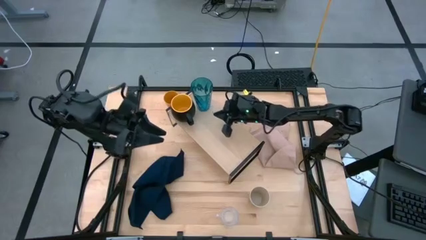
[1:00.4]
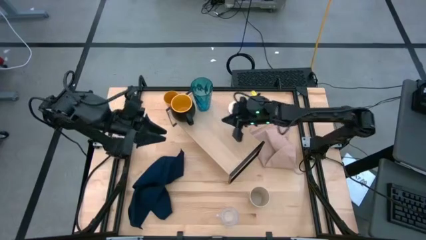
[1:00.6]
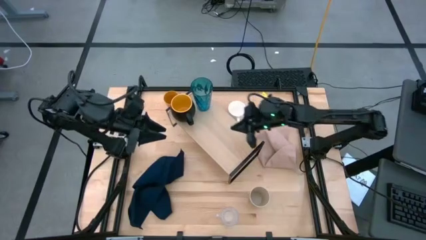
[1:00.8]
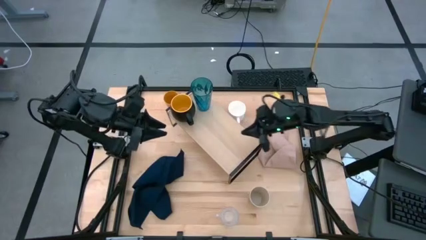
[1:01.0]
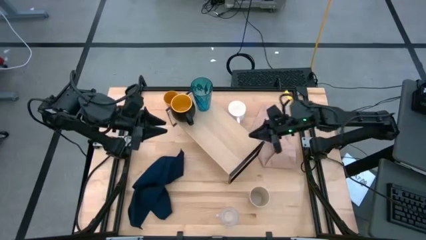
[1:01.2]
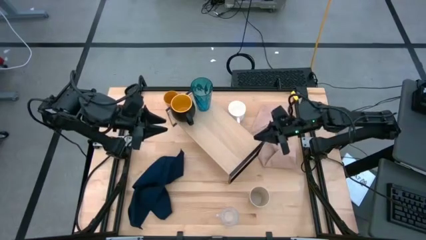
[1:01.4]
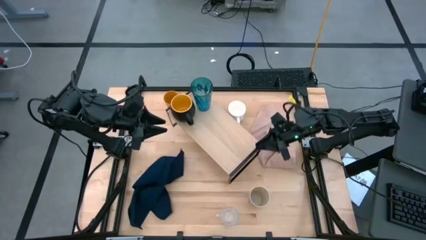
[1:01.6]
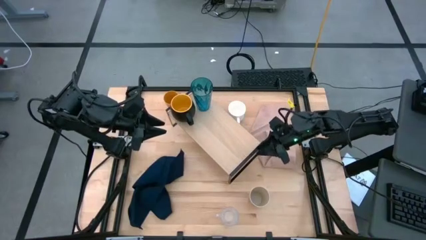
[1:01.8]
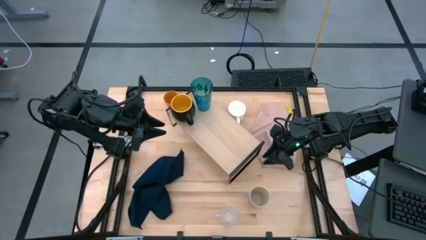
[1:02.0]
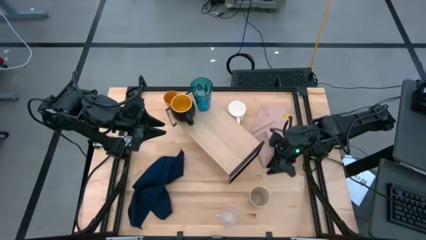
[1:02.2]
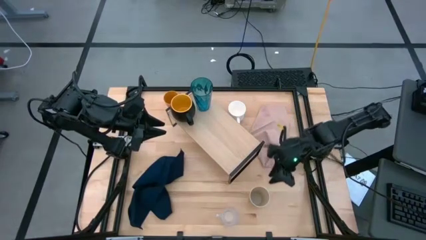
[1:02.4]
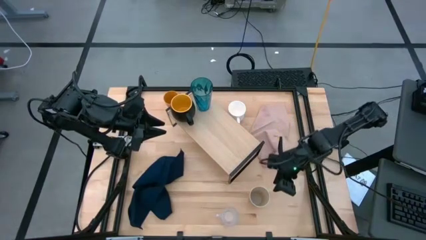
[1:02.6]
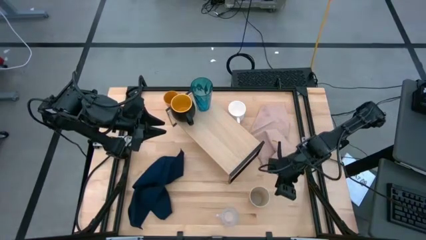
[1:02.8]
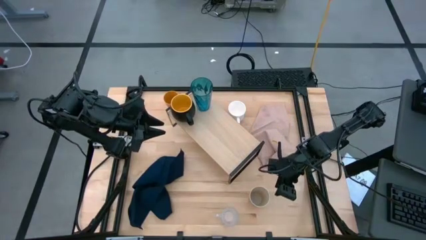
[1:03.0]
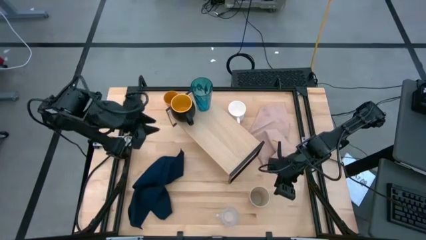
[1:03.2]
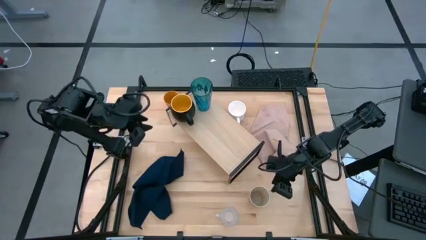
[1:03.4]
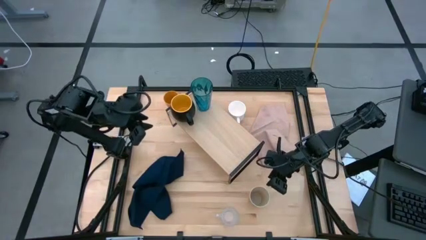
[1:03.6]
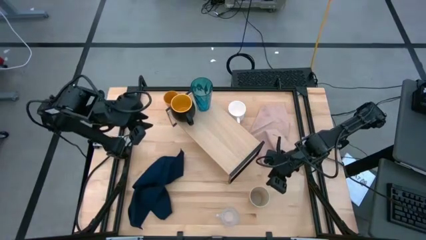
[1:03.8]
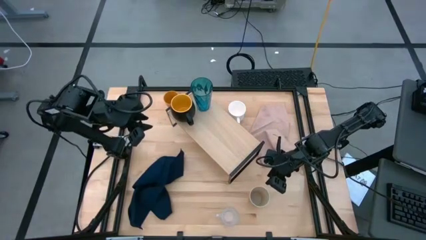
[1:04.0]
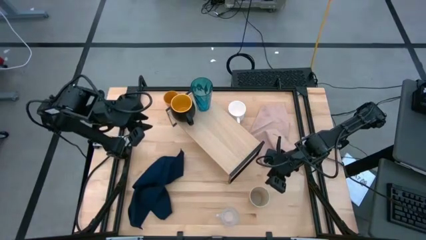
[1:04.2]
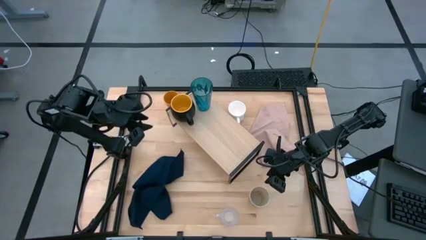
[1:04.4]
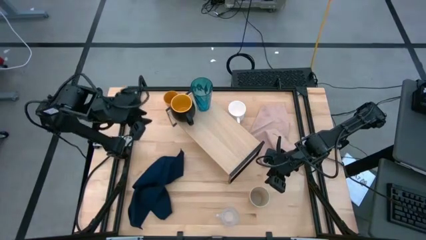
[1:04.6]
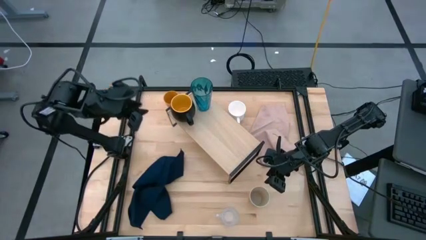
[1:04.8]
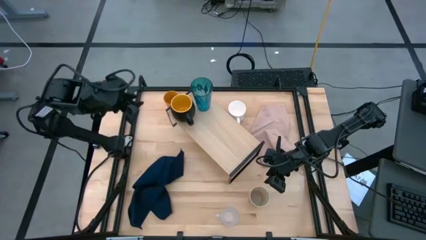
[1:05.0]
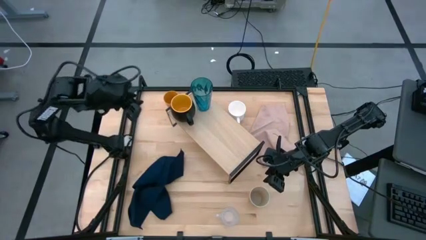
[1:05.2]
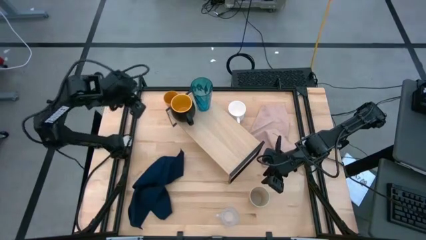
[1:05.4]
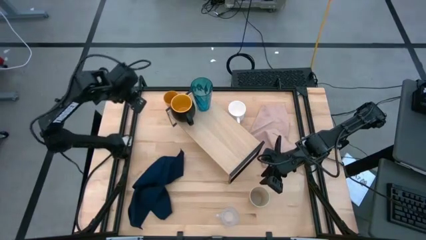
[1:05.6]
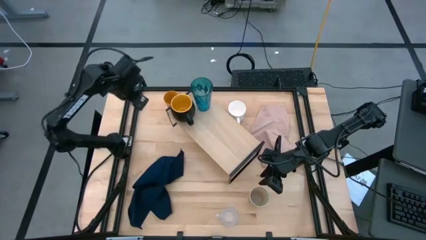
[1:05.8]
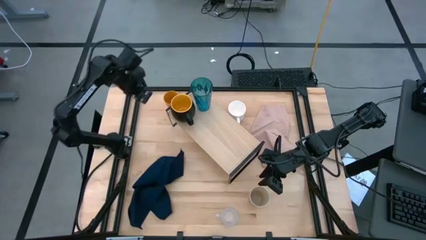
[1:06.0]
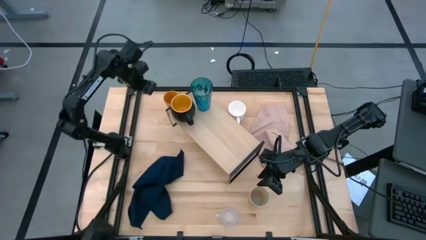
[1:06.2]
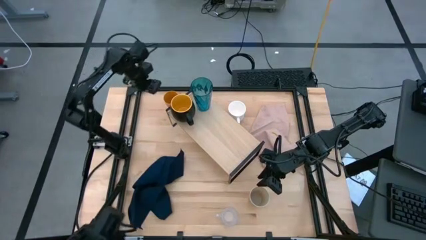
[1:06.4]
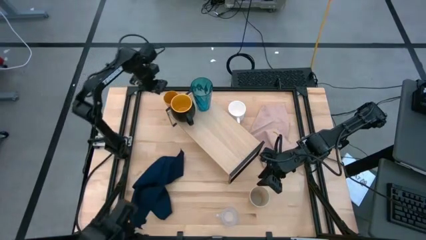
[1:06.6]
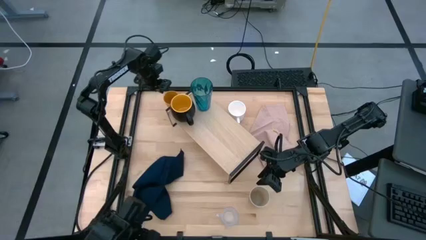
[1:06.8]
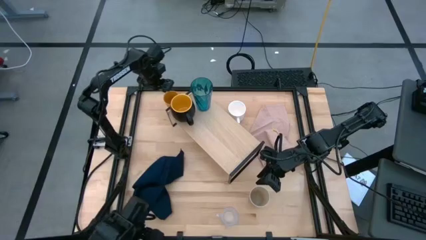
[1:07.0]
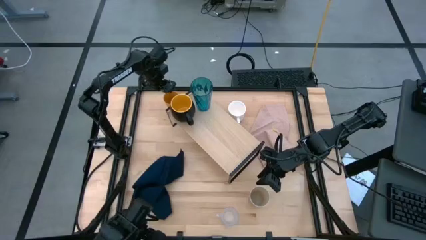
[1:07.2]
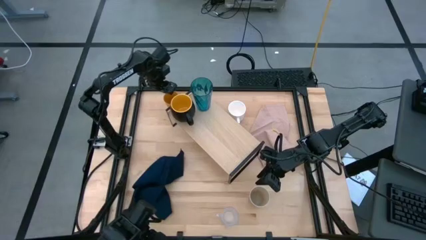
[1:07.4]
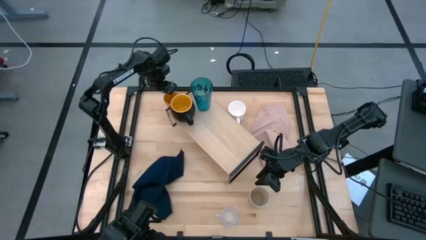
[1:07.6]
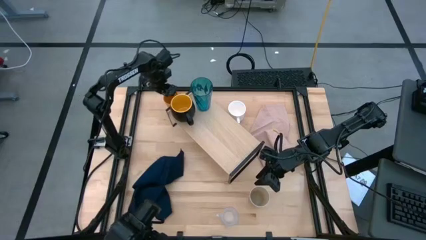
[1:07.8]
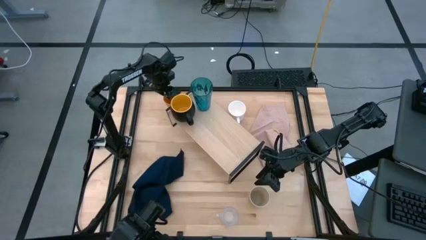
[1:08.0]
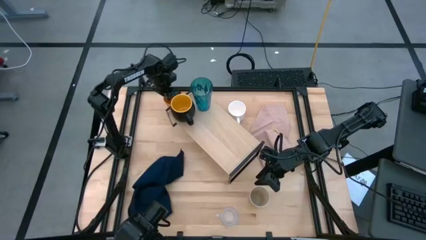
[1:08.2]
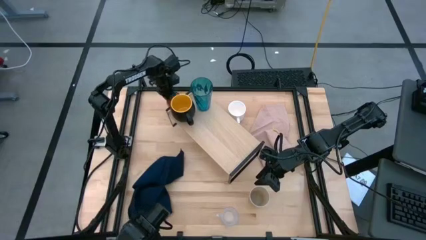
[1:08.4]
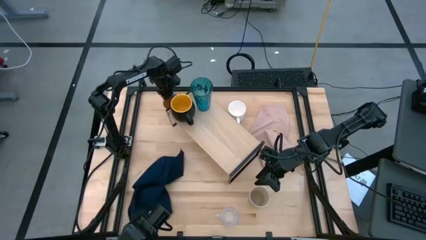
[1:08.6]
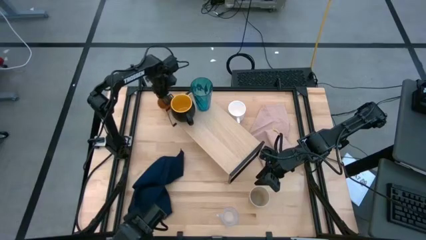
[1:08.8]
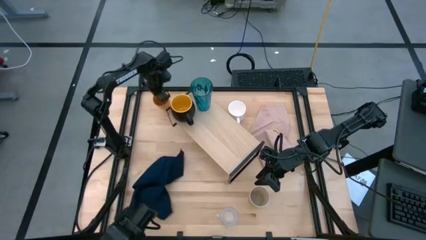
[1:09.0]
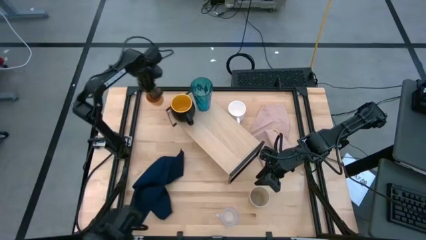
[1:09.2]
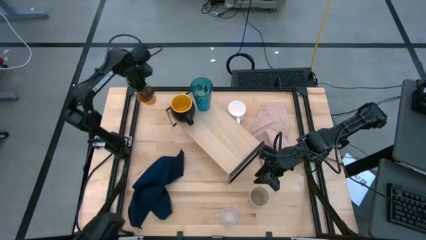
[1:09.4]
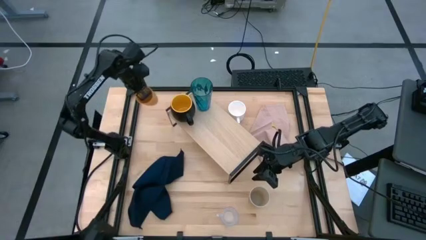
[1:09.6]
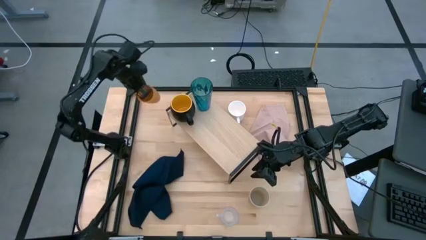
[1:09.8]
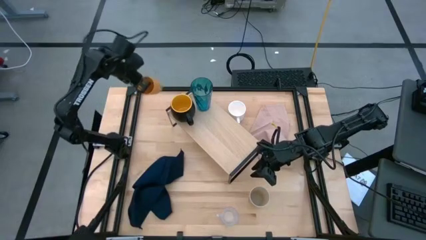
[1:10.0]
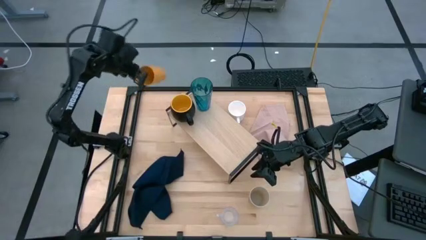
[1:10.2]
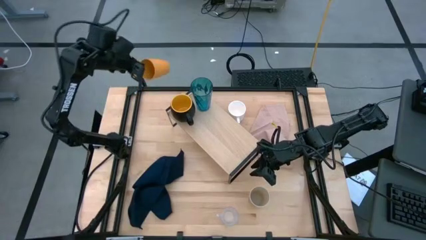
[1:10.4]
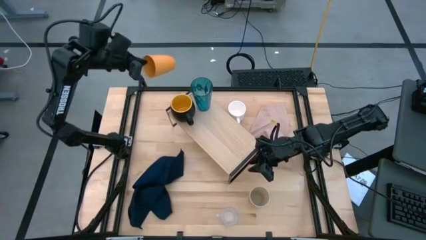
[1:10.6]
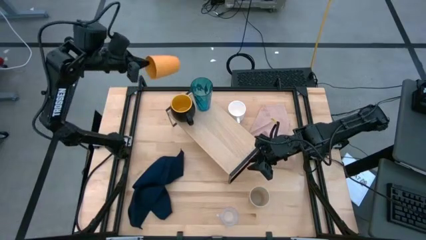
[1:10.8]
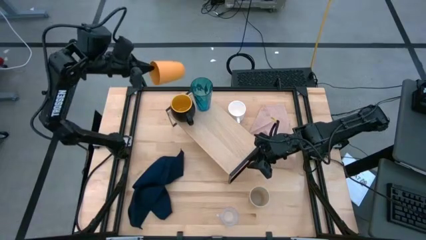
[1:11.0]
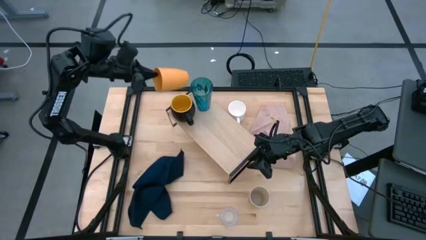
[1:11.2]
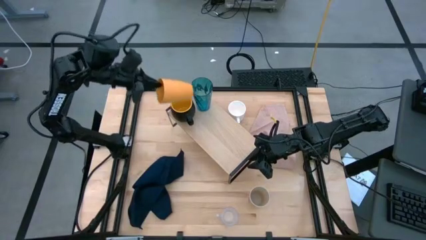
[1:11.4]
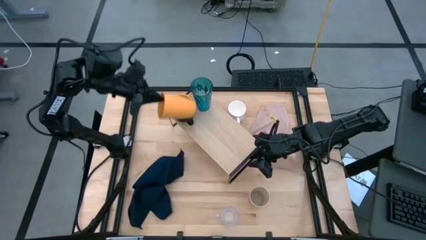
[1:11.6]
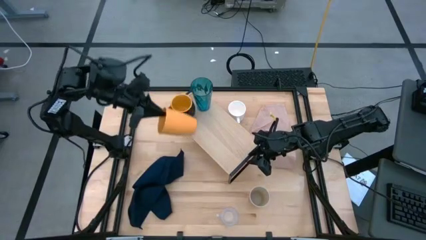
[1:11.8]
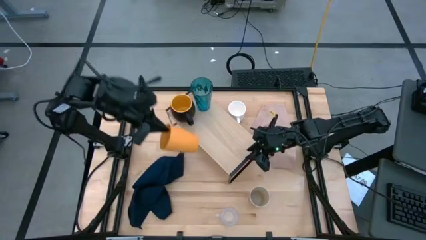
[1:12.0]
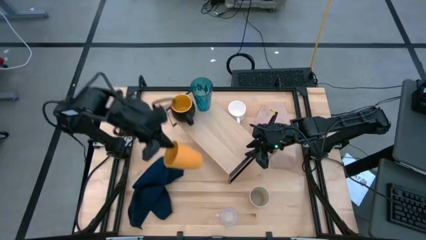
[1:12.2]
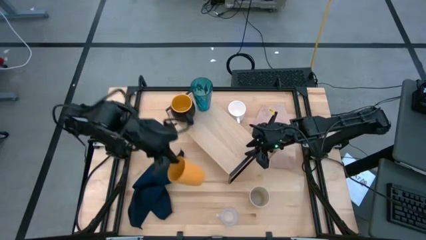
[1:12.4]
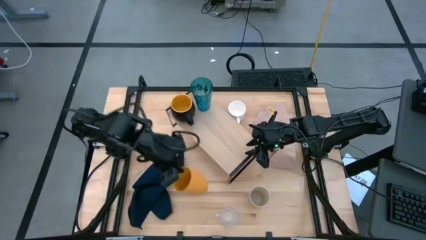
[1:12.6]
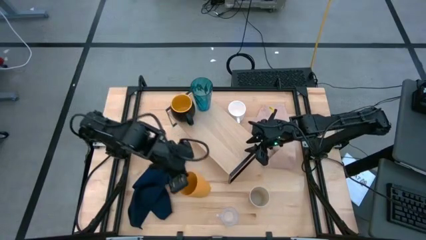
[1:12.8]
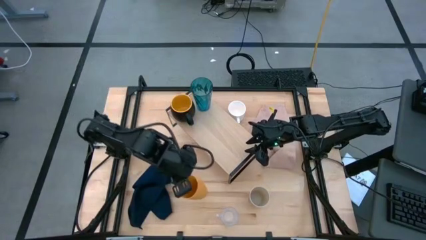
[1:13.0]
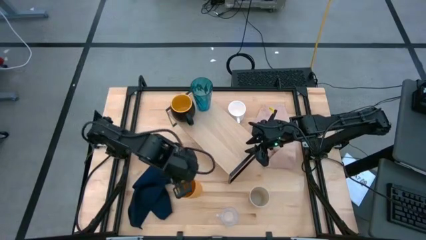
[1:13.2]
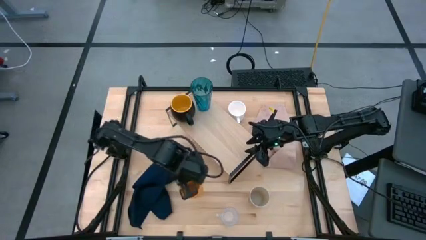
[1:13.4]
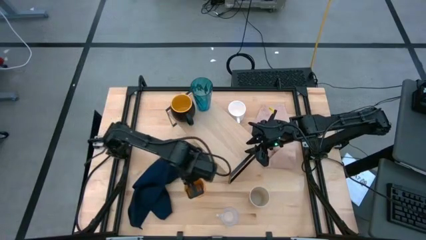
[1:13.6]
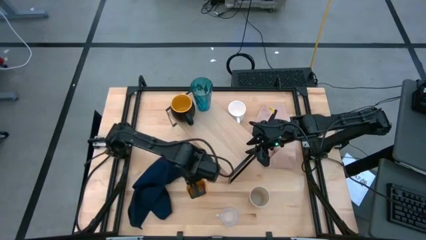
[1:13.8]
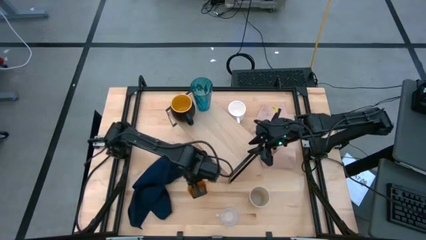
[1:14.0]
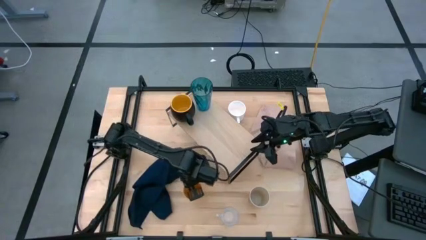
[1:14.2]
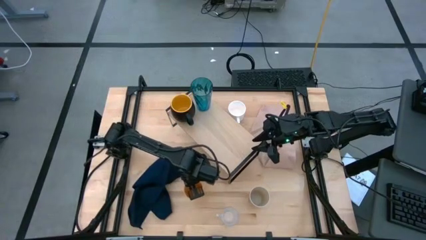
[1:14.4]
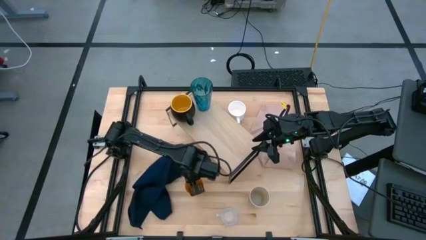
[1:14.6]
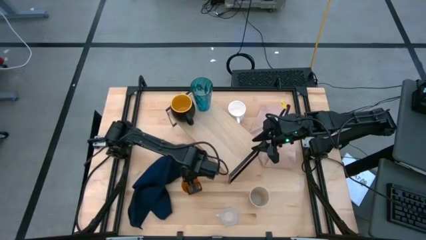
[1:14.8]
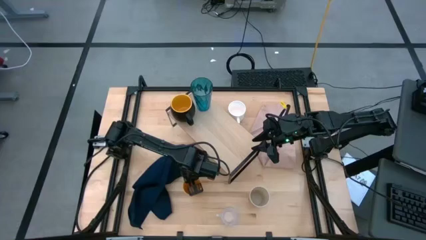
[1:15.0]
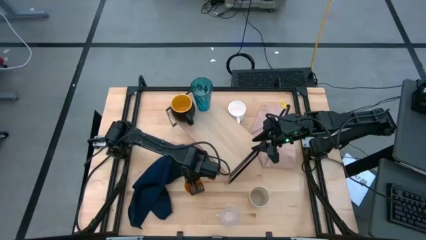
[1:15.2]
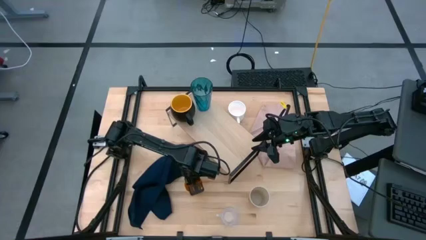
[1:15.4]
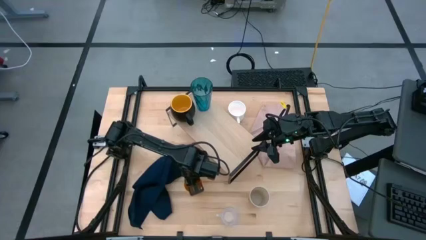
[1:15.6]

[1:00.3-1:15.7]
Task: Stack small to large cups/mugs on shelf
Move the yellow cup to the bottom of the table
